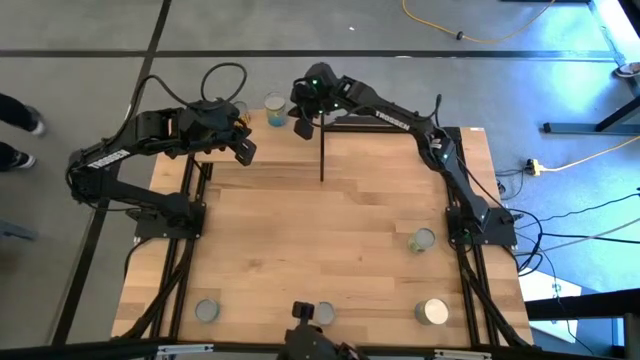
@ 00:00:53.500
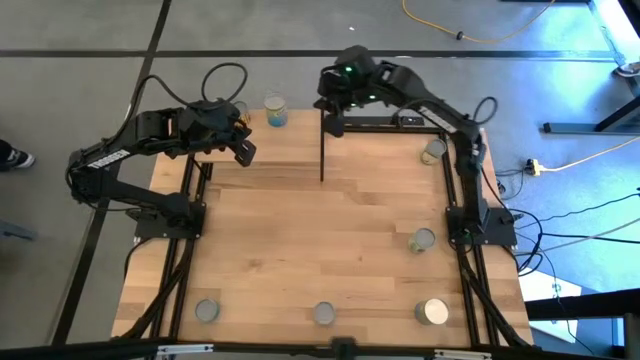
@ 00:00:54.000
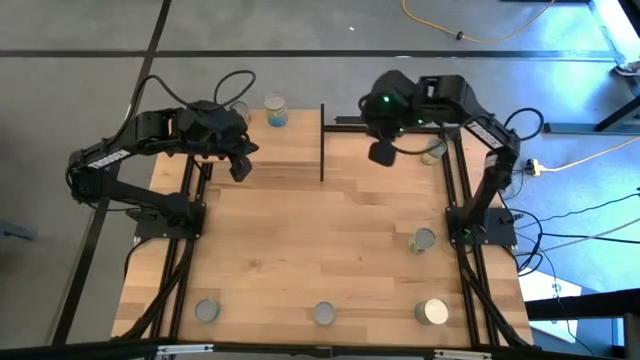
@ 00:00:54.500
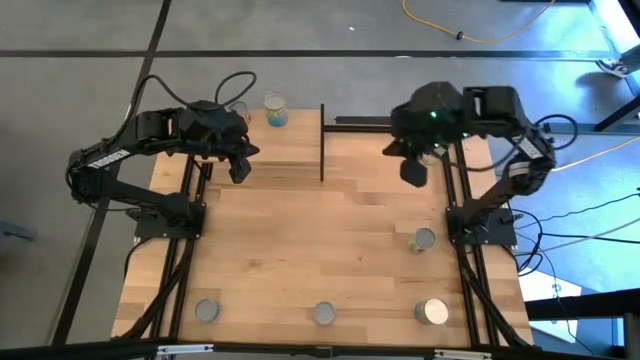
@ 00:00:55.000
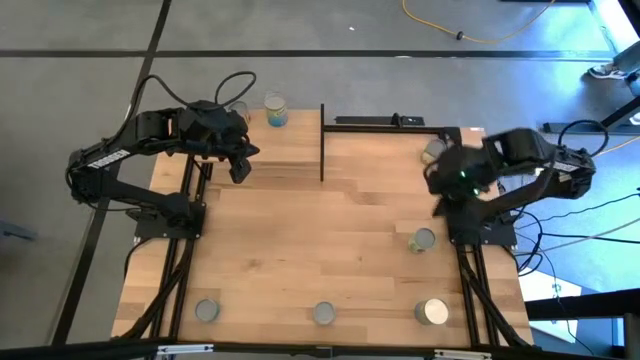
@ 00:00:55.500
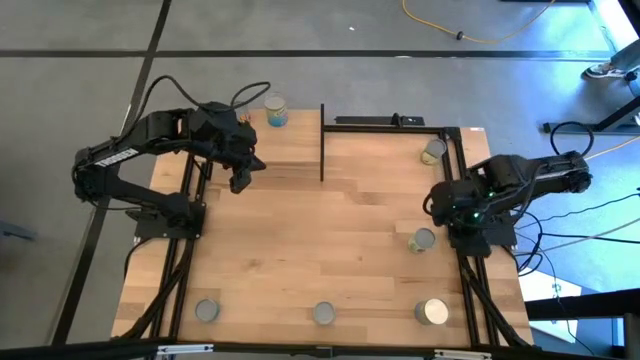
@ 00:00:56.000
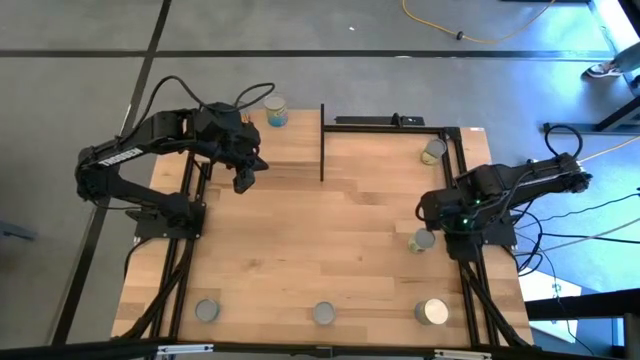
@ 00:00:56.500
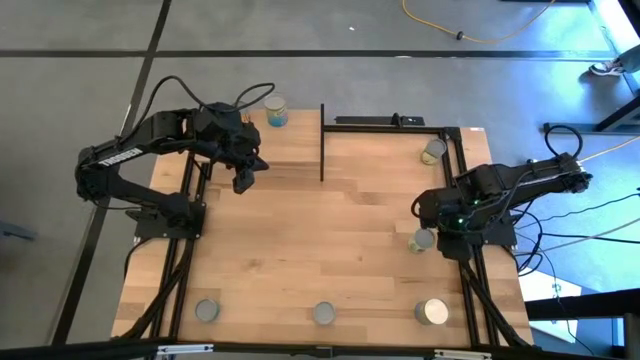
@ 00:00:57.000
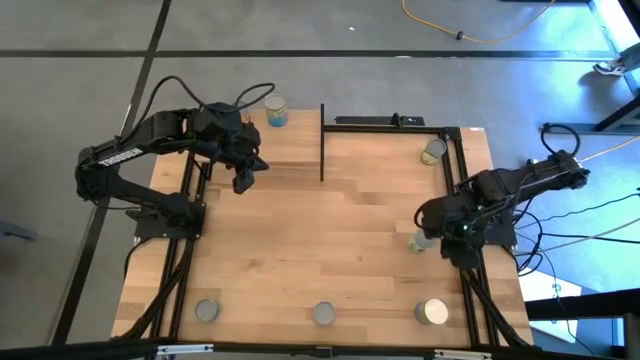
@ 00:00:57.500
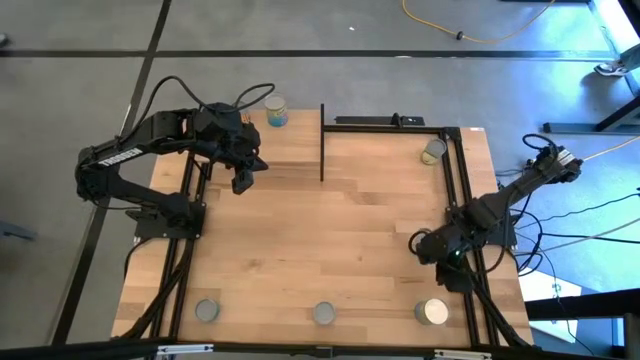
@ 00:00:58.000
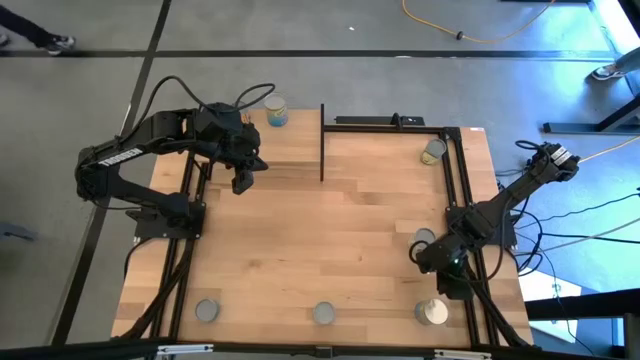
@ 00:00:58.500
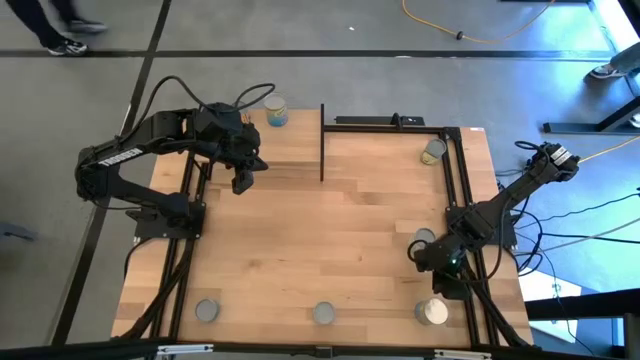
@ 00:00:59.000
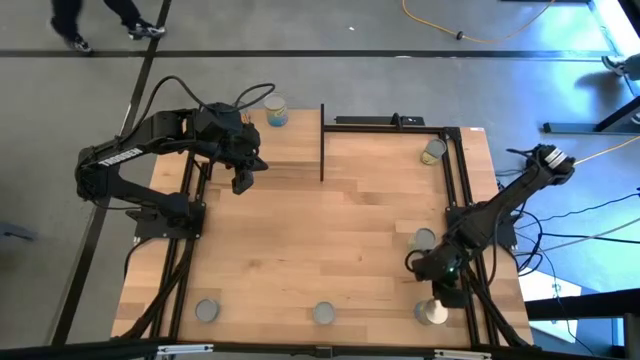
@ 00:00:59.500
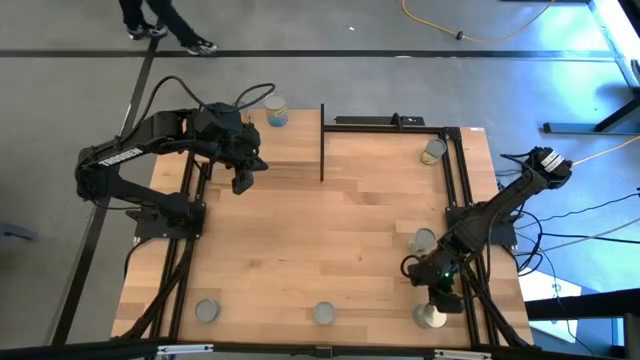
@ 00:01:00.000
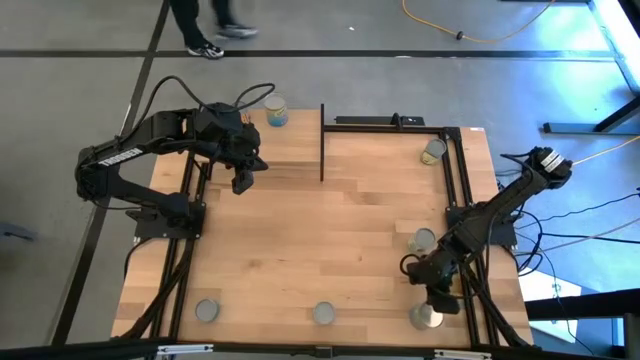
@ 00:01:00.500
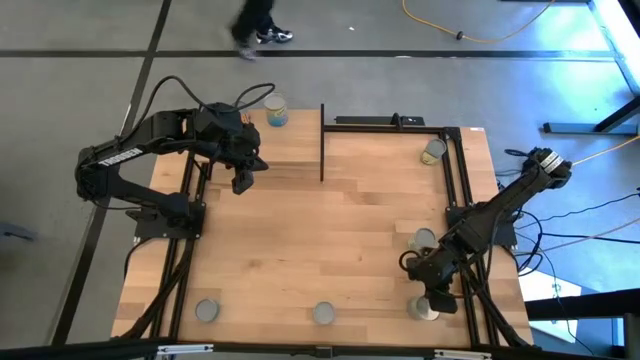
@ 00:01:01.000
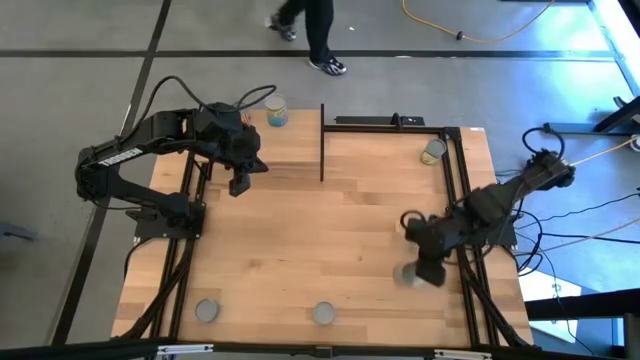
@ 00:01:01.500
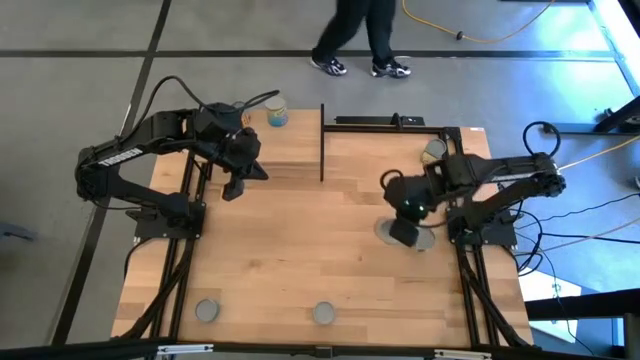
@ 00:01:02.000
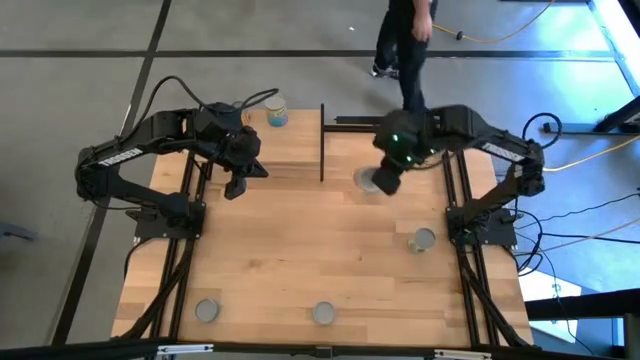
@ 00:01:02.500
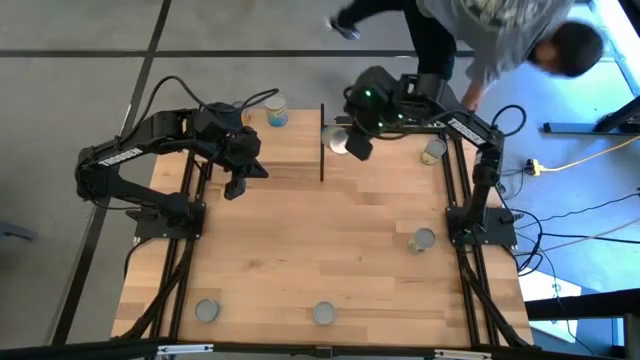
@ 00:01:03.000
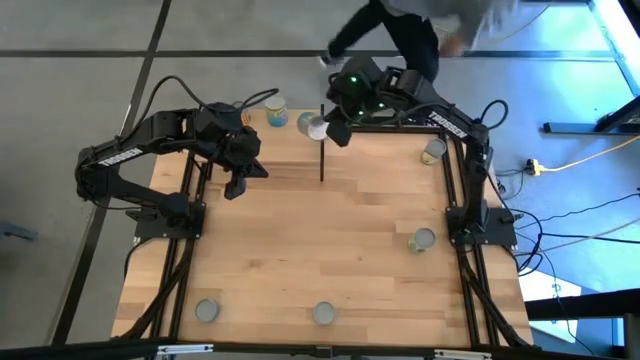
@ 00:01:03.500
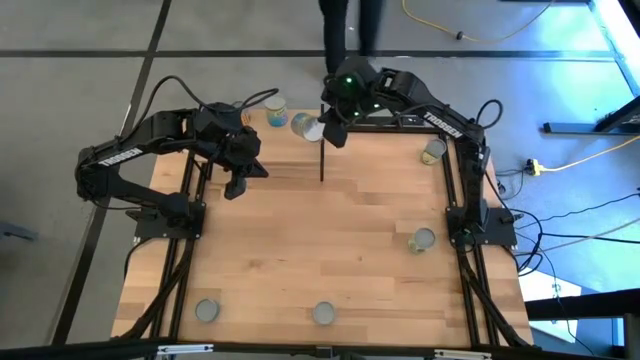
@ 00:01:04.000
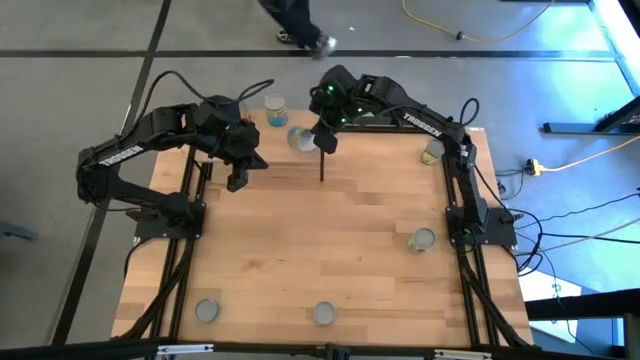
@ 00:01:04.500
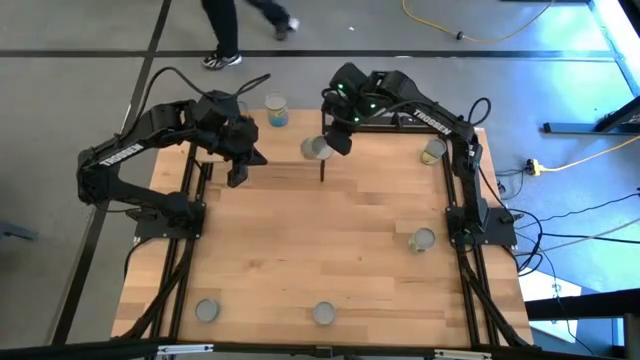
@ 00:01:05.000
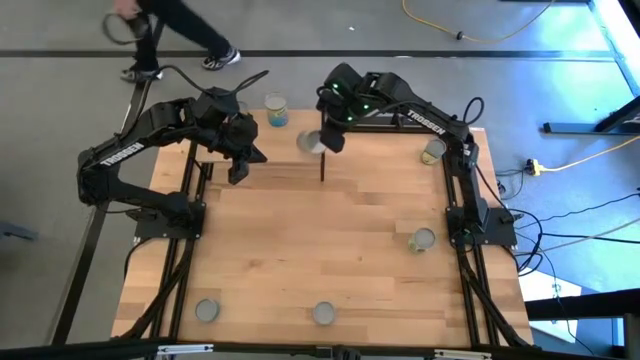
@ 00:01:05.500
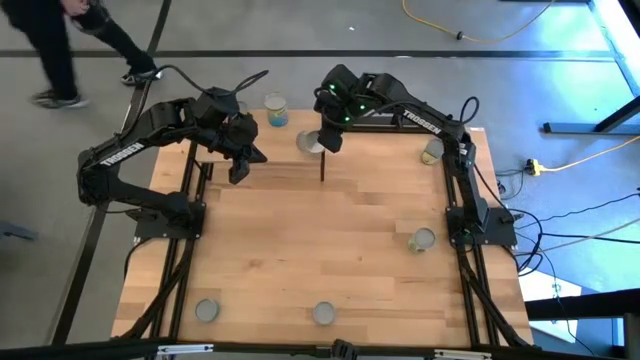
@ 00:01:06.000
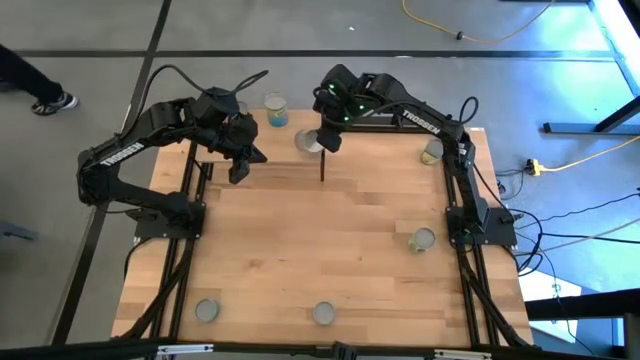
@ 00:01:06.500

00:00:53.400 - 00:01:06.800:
Task: Pick and place cans onto a shelf
Put the canned cherries on the shelf
